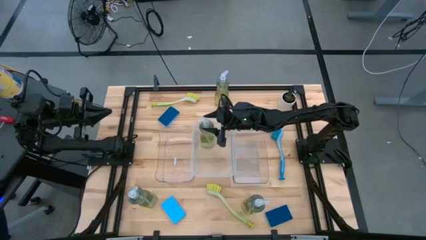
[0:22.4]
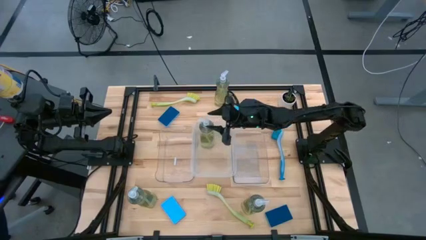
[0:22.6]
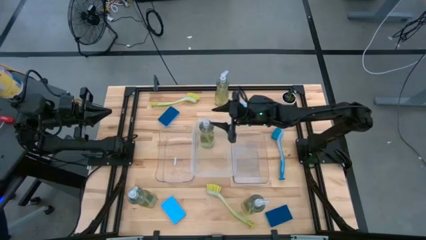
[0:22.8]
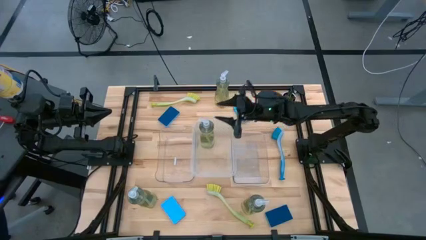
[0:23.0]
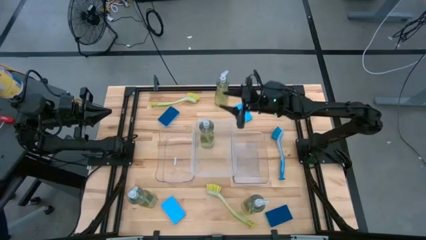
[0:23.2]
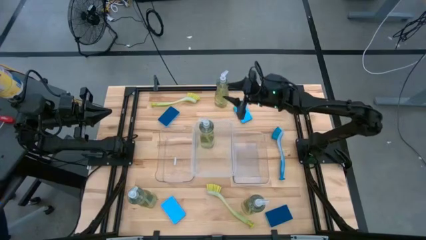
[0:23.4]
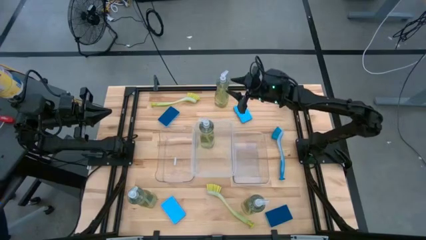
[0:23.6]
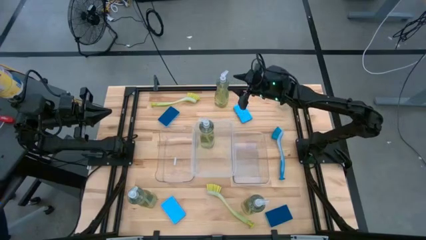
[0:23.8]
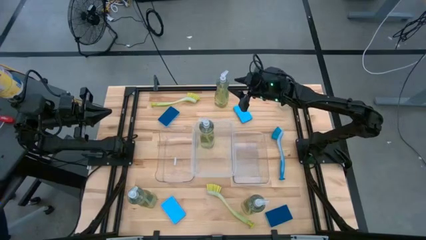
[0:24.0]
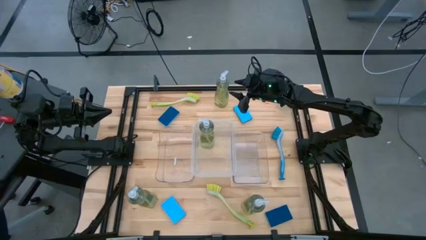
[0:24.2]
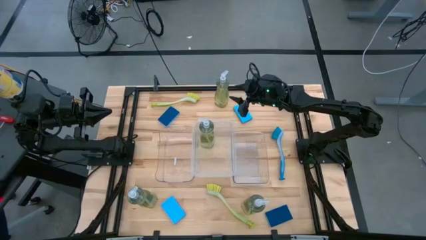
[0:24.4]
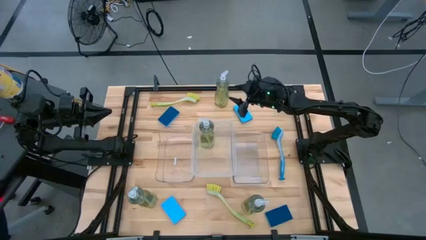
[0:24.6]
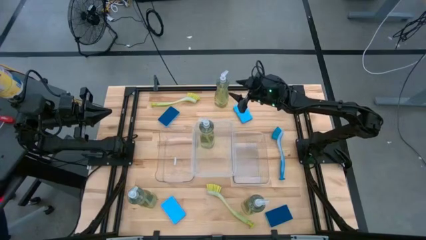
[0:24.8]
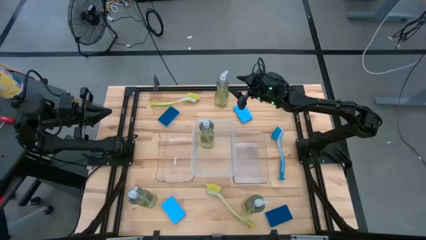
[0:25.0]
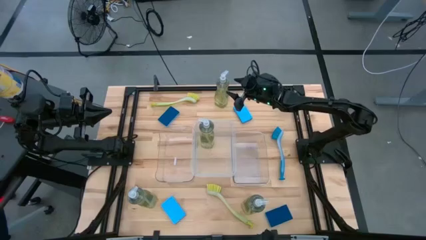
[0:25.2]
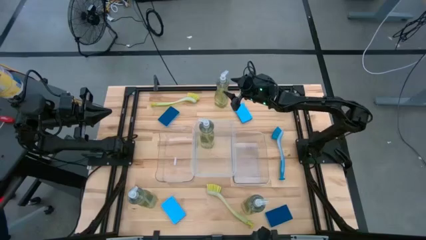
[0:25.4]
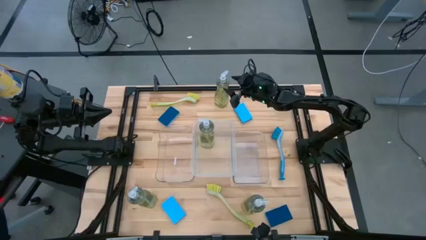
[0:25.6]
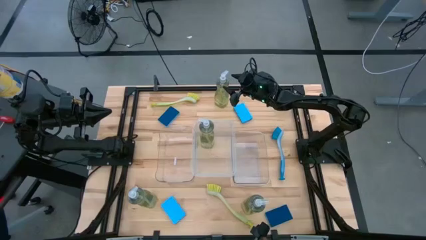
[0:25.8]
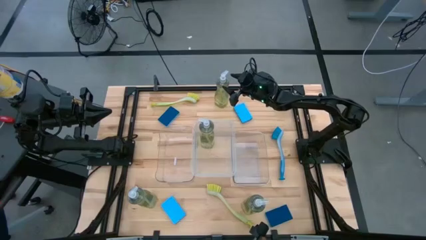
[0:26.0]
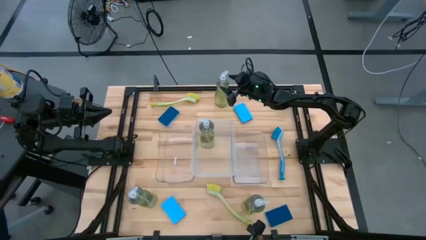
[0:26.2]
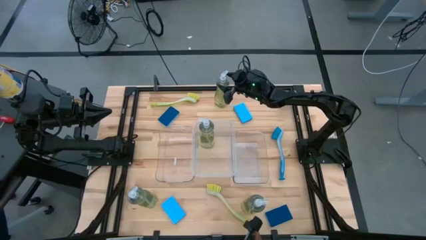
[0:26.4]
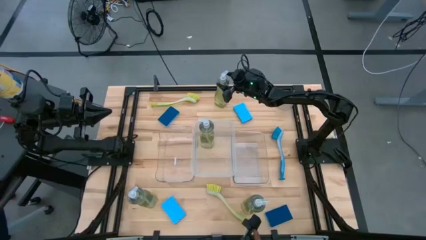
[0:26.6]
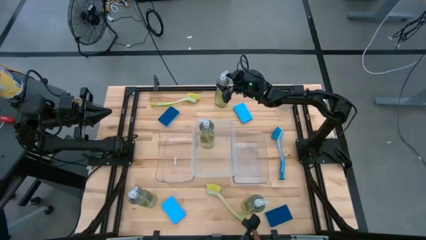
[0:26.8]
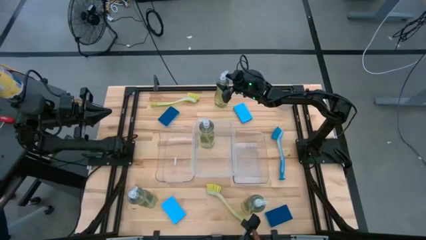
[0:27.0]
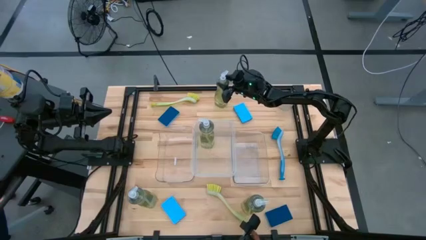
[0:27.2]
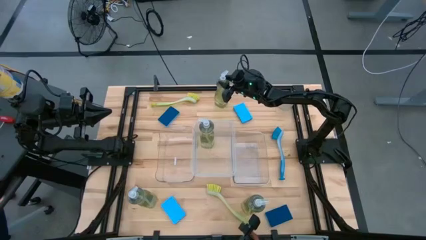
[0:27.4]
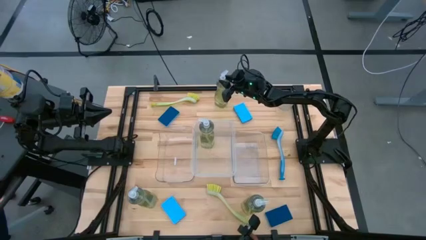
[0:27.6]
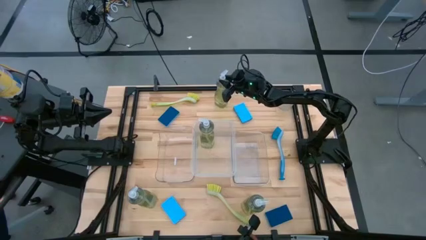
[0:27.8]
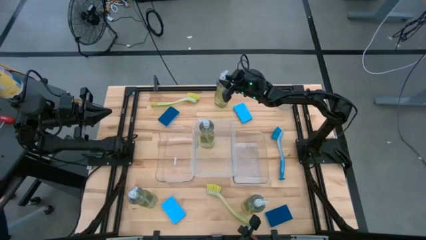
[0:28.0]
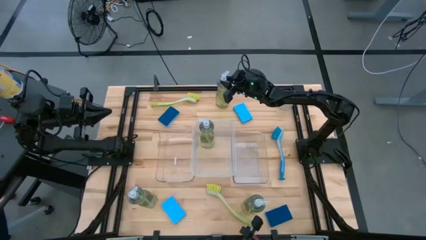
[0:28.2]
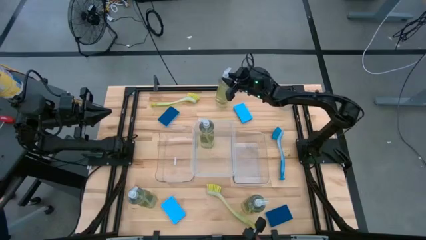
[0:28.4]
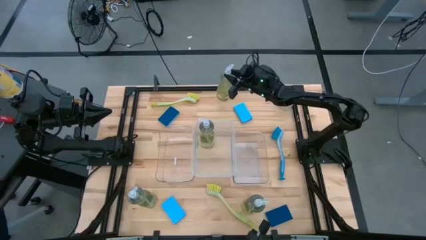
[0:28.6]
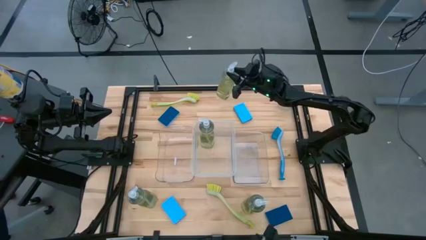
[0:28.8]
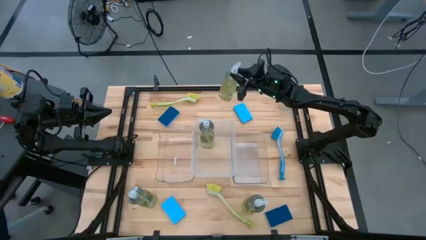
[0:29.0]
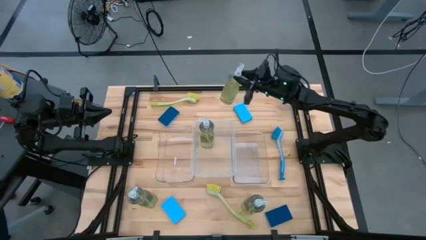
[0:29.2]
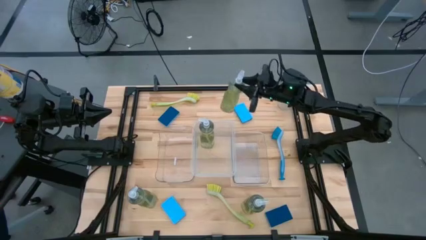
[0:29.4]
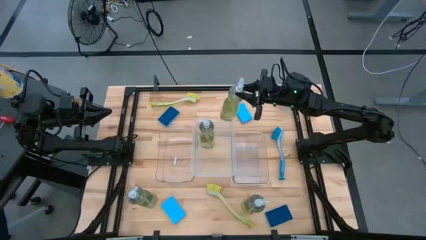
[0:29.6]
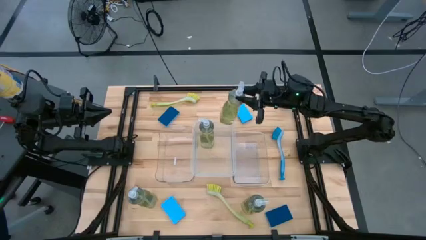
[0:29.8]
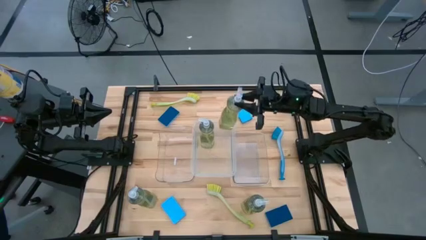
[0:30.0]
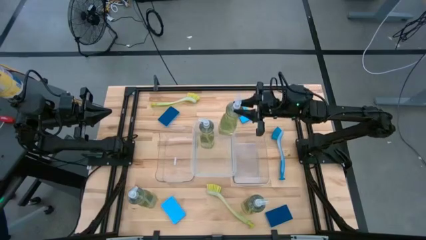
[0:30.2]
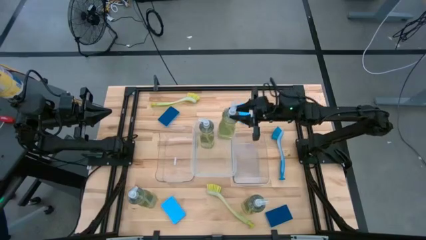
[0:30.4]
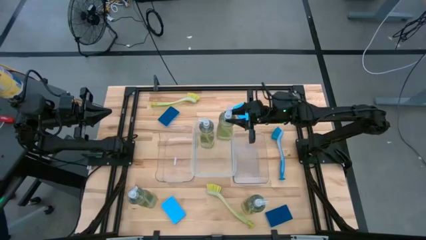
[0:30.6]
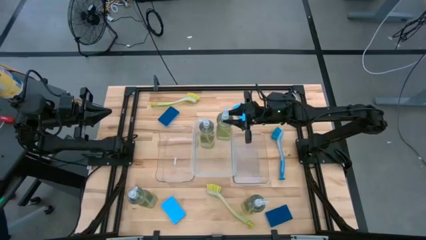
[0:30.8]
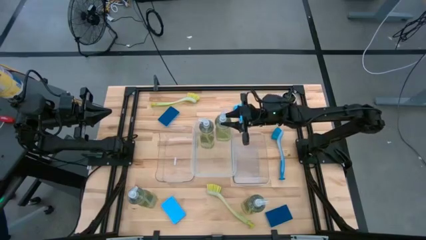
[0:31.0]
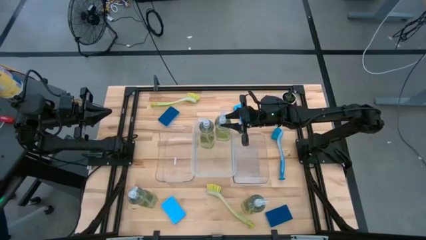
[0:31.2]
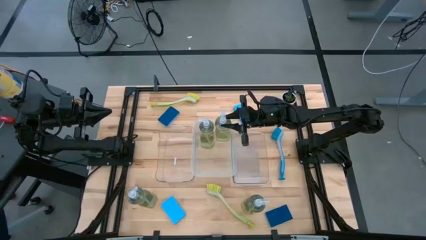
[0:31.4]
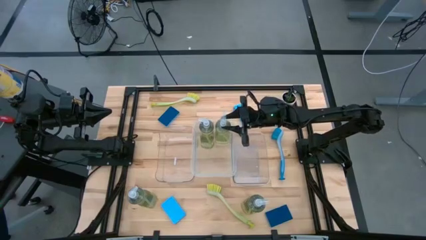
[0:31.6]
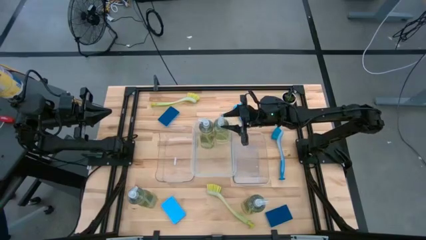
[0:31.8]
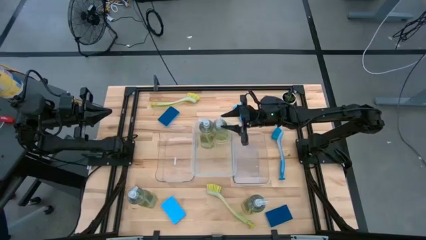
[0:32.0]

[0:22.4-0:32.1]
Task: Pick & Place Kitchen Sink Supplies
Put the transparent dishwashing liquid dispenser into the middle transparent bin

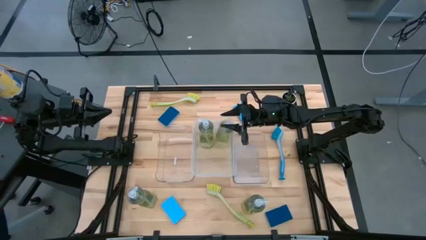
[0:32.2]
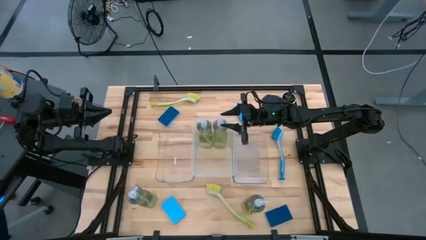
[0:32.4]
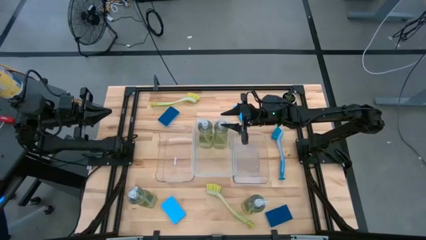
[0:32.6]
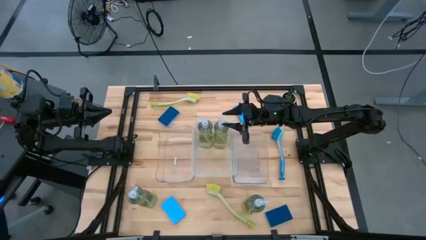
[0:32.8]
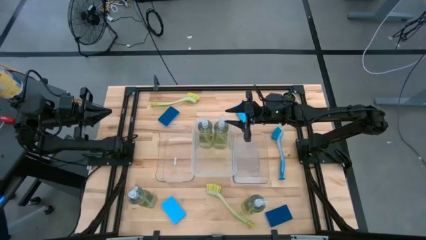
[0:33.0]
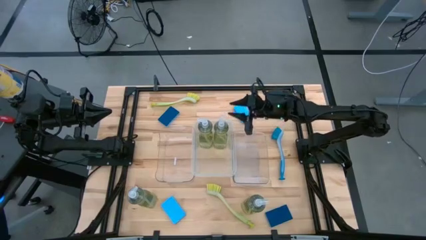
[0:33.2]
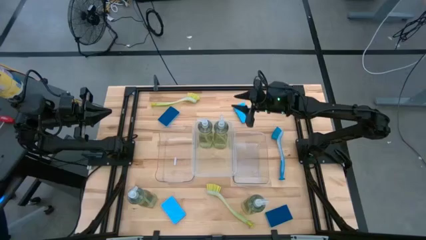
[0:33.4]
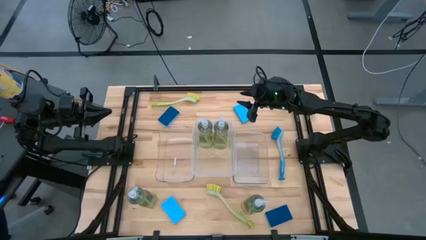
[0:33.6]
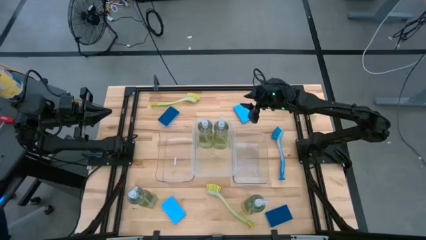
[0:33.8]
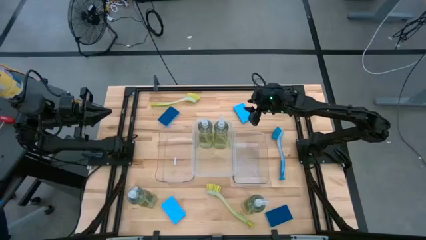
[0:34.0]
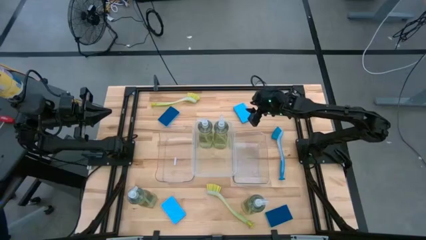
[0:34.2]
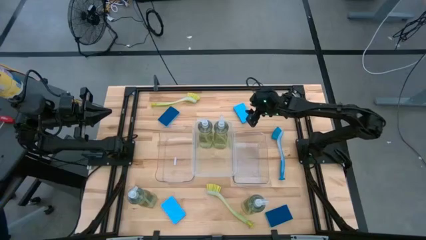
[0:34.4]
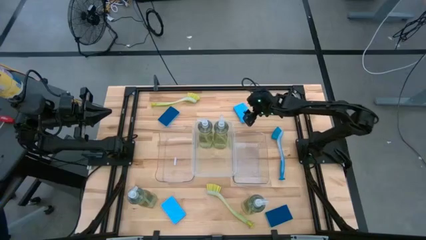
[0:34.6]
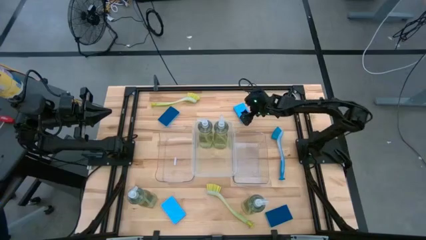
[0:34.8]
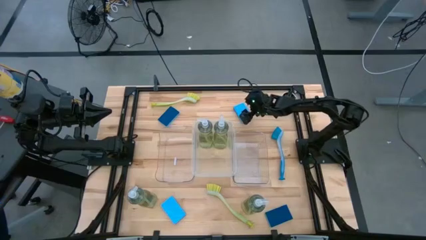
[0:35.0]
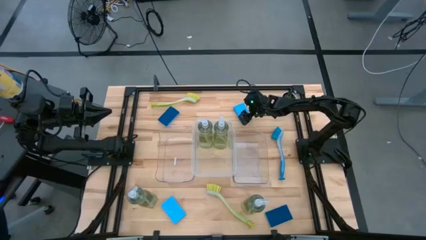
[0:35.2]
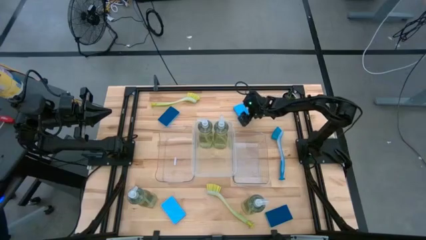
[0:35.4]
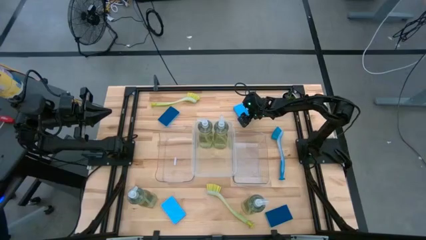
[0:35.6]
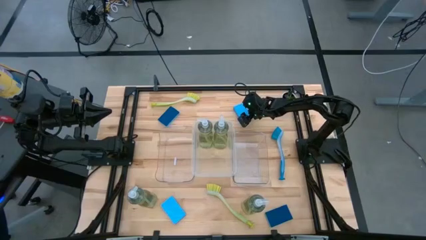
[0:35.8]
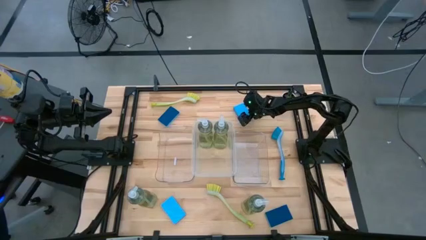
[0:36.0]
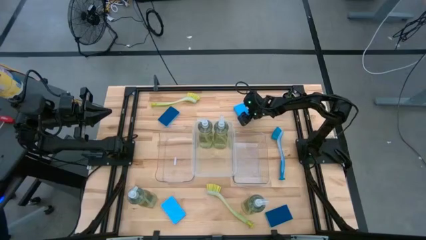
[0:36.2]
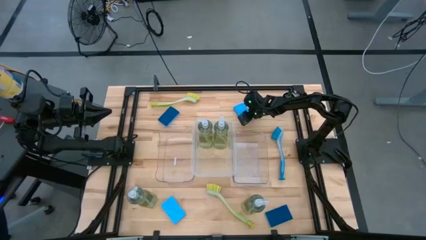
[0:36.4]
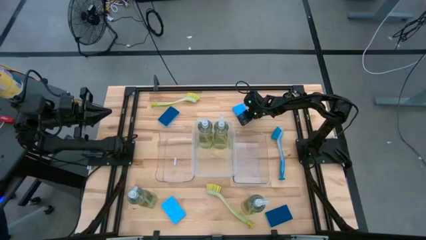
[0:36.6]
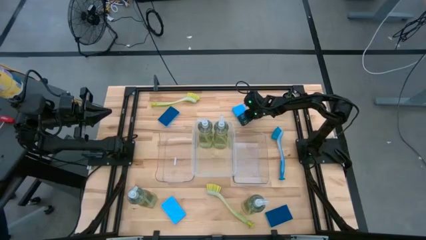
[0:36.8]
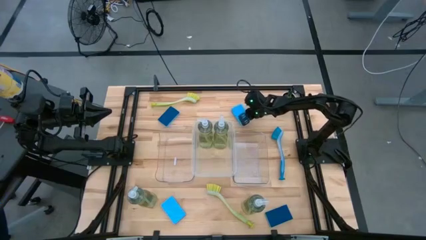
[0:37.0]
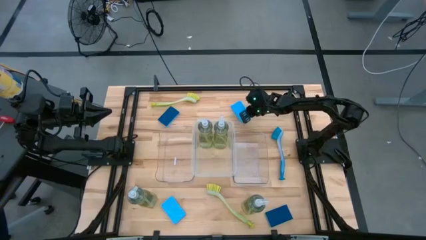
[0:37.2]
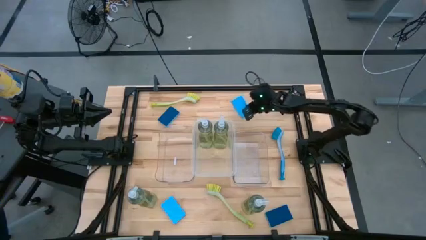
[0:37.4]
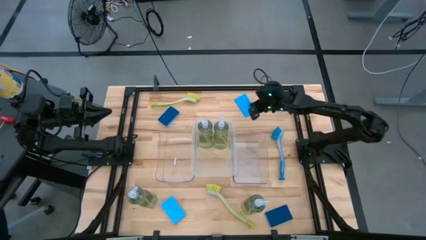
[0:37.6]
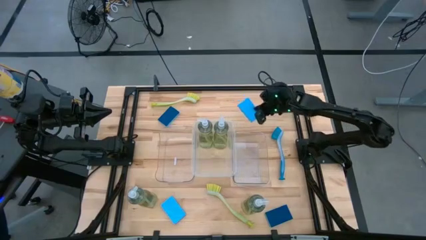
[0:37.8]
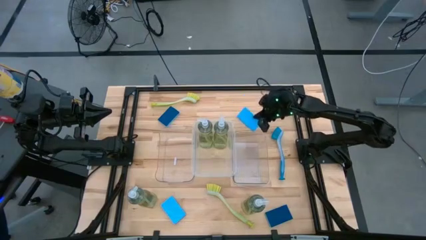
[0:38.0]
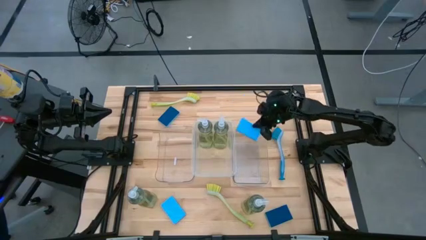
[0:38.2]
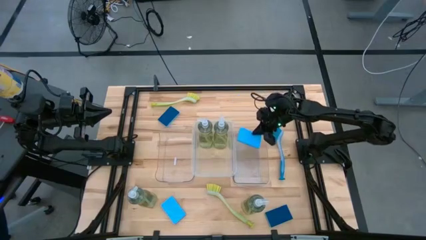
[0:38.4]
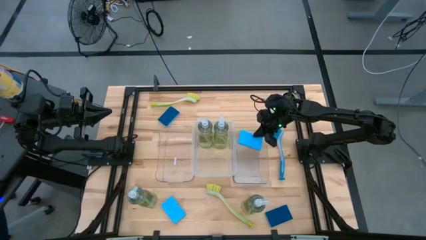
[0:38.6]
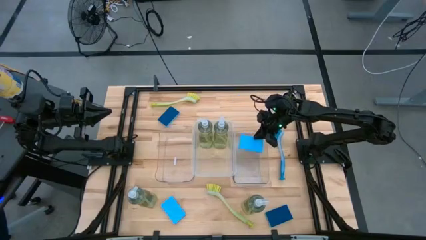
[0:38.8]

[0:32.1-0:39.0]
Put the blue sponge wipe into the right transparent bin
